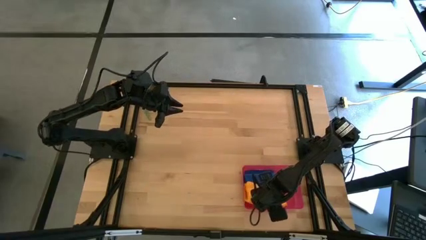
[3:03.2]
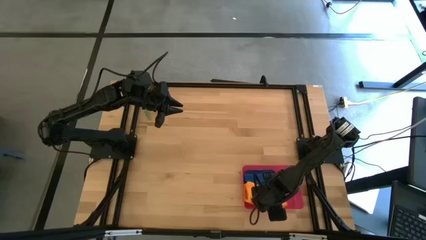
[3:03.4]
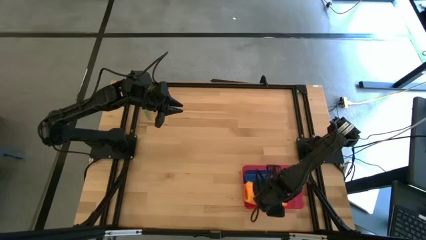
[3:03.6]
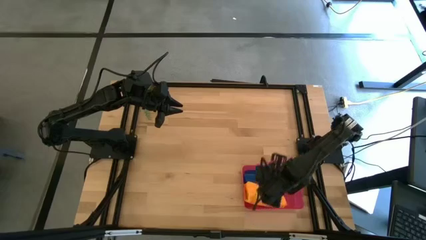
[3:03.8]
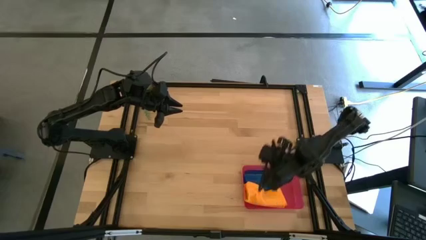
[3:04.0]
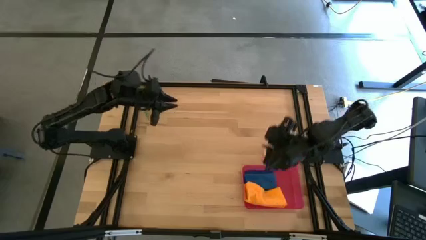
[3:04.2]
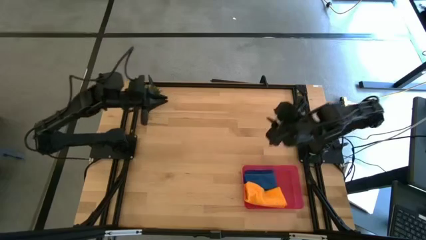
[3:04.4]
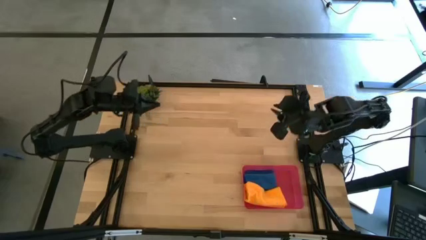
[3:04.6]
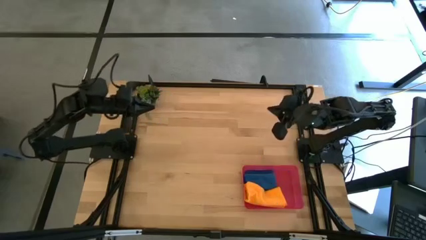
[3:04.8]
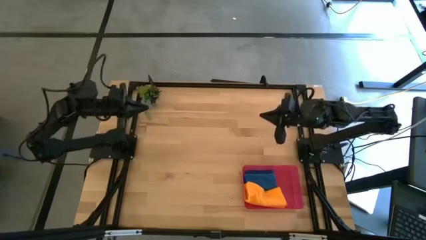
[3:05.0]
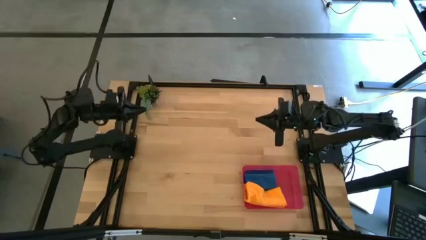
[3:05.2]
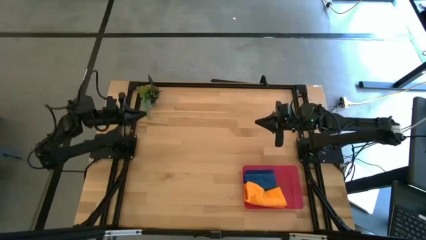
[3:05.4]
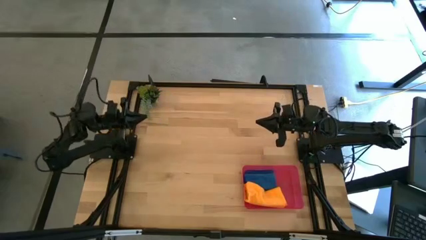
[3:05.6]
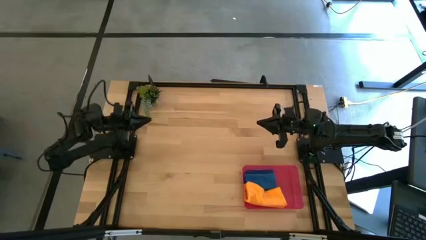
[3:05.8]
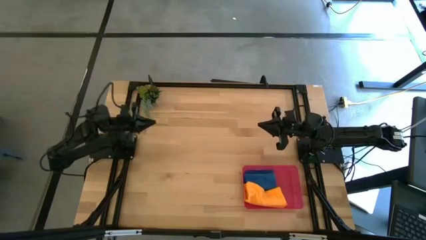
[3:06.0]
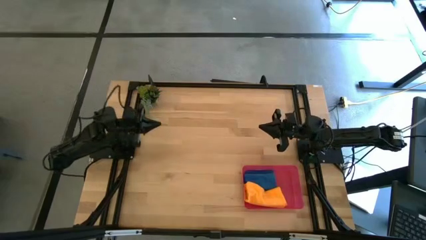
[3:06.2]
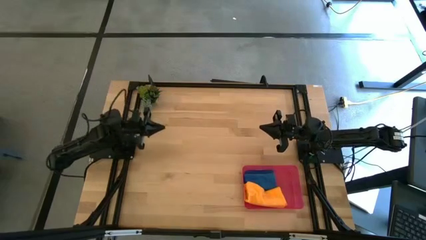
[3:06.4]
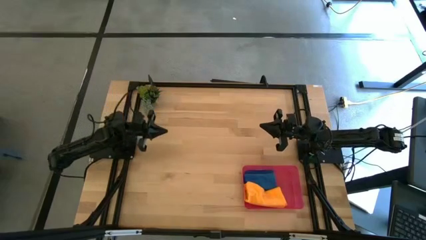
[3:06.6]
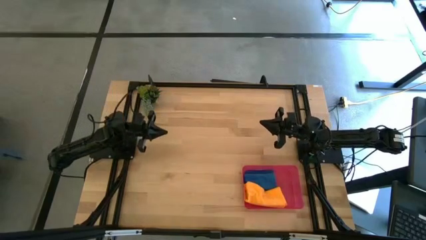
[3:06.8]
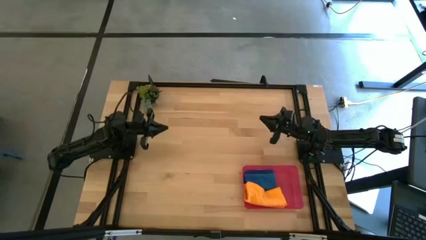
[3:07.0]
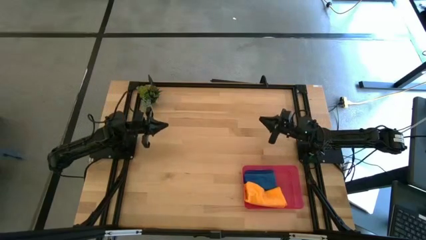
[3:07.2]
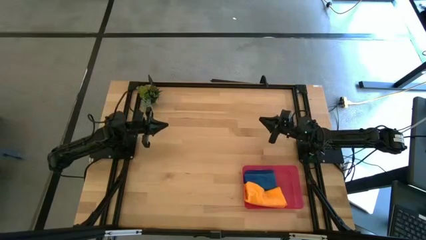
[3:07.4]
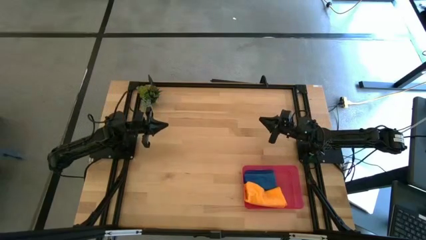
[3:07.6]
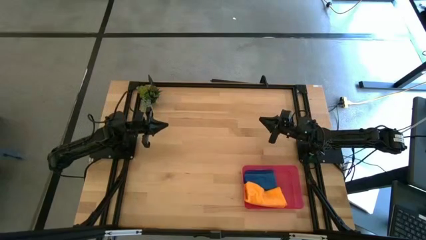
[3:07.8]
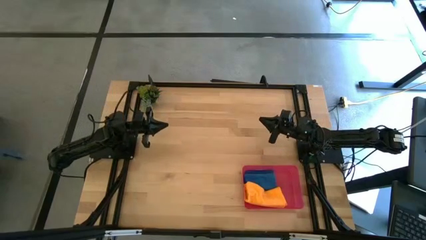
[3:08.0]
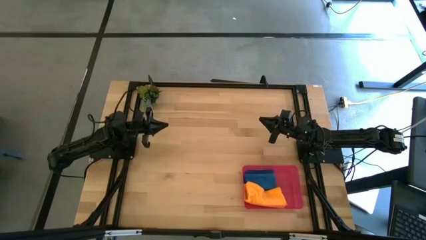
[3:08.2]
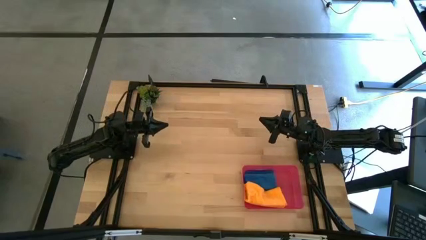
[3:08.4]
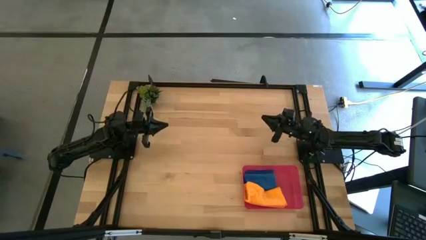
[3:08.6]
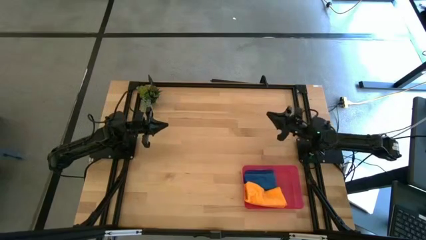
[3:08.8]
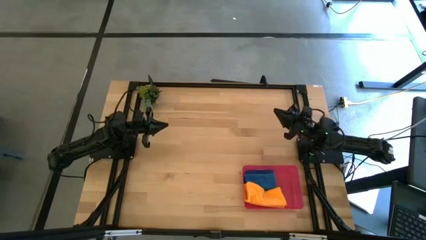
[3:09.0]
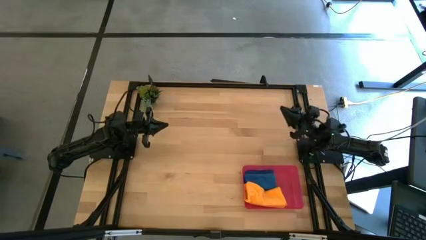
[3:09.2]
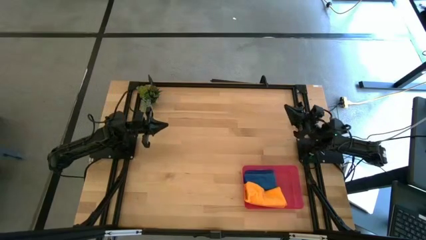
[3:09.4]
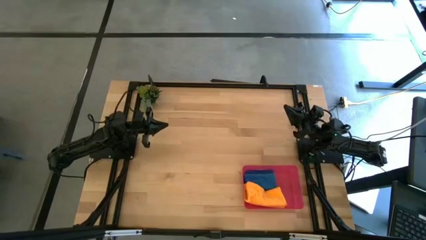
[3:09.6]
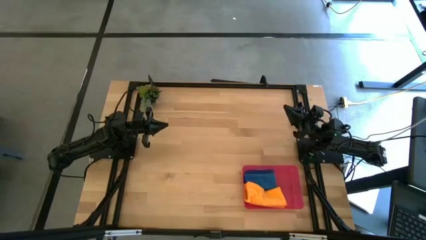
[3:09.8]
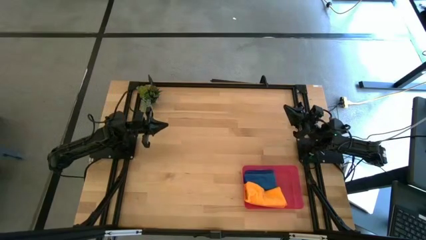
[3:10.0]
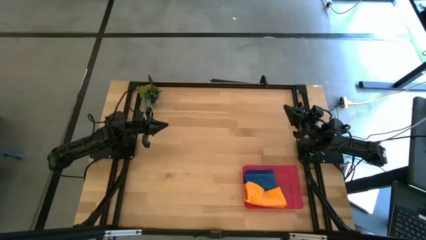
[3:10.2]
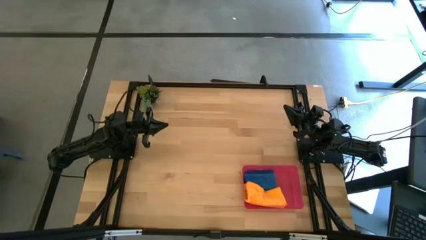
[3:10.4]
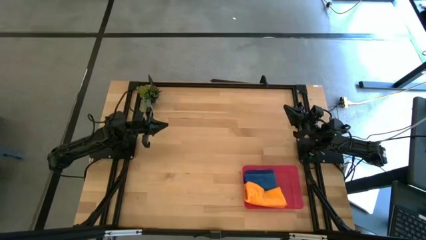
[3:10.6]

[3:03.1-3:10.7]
Task: Roll microfiber towels into tight, uniform cylinder then place into a basket
Return to Home Position

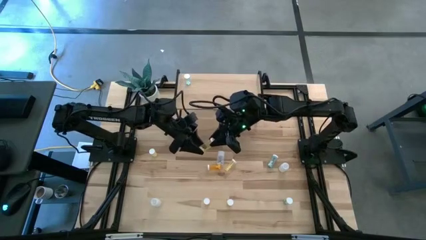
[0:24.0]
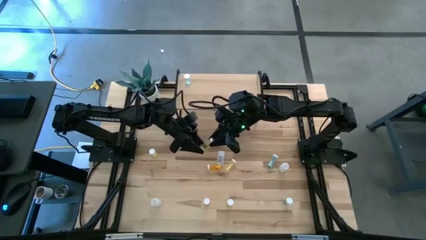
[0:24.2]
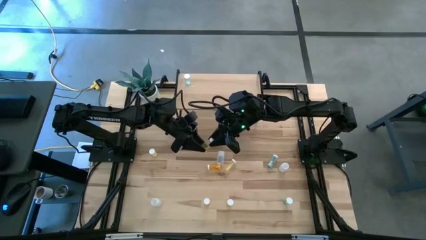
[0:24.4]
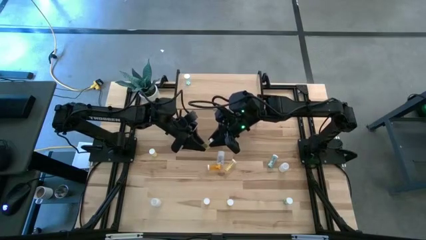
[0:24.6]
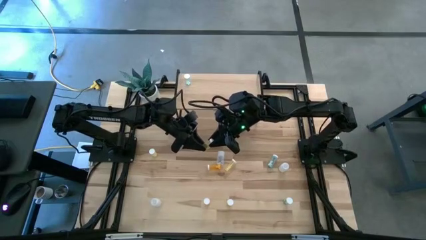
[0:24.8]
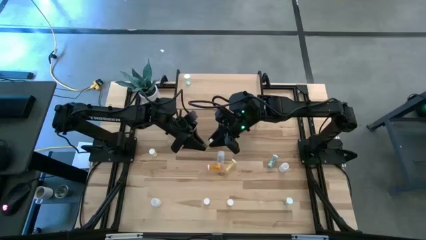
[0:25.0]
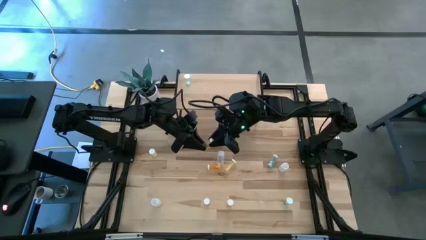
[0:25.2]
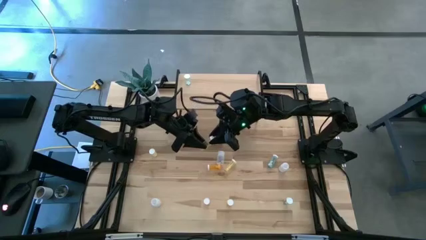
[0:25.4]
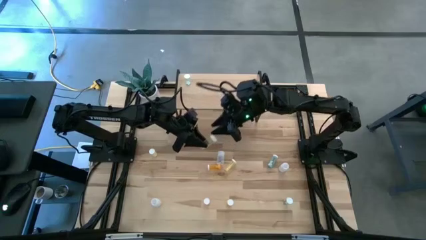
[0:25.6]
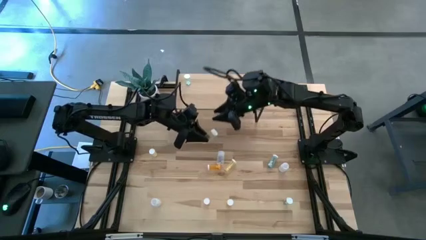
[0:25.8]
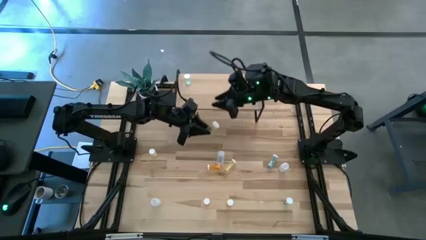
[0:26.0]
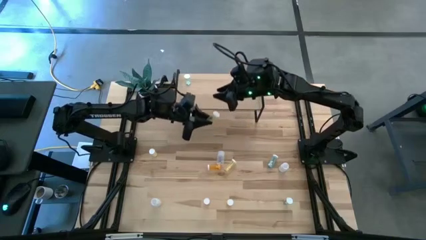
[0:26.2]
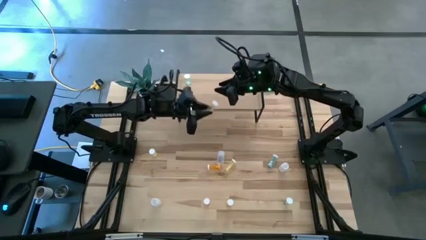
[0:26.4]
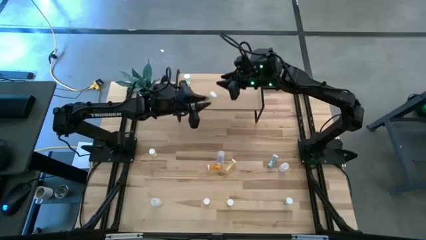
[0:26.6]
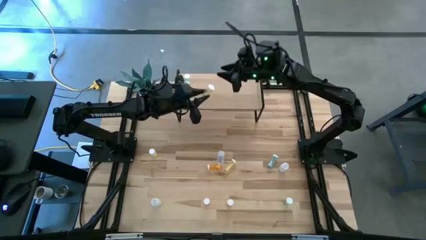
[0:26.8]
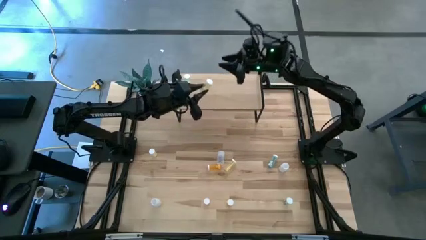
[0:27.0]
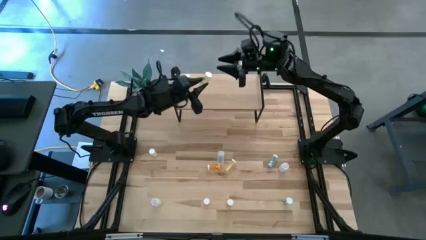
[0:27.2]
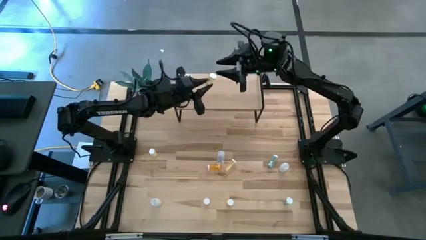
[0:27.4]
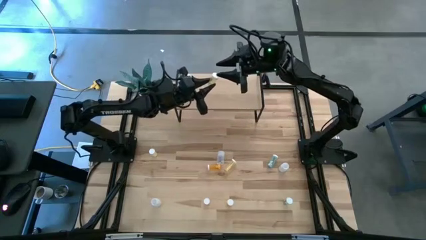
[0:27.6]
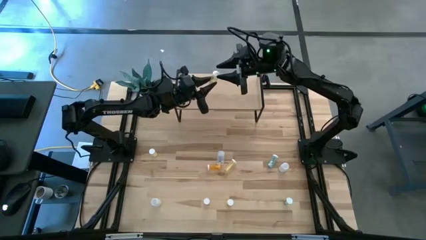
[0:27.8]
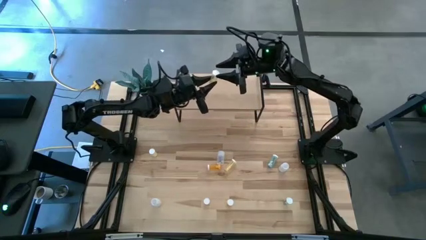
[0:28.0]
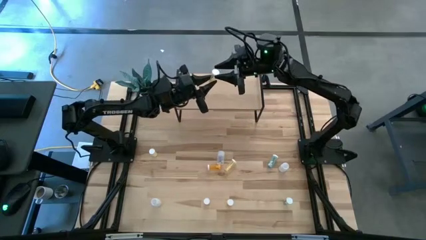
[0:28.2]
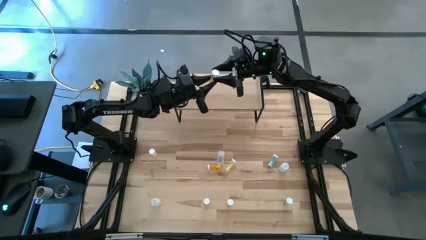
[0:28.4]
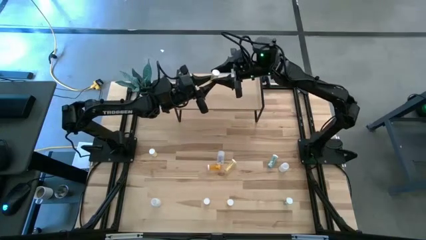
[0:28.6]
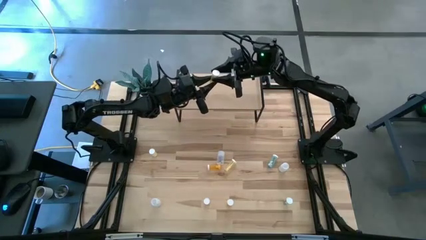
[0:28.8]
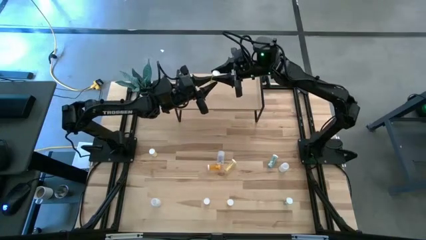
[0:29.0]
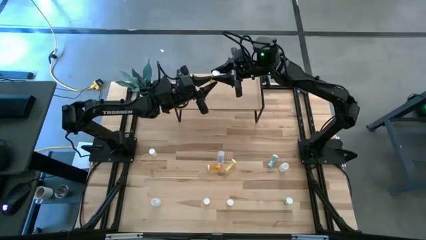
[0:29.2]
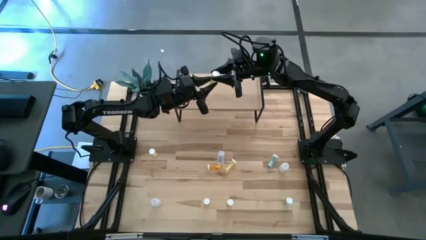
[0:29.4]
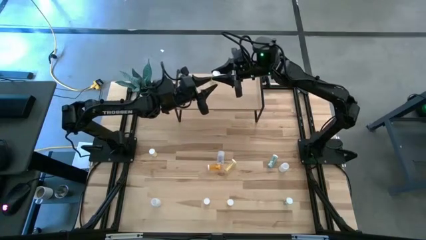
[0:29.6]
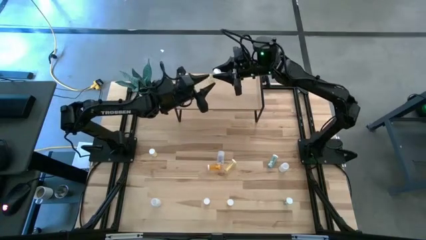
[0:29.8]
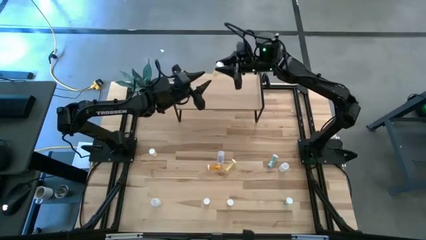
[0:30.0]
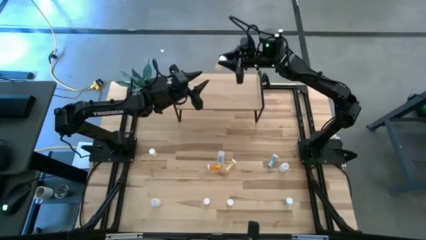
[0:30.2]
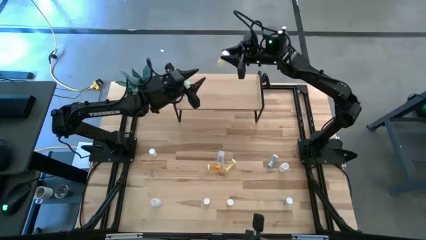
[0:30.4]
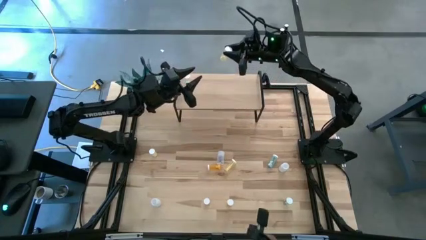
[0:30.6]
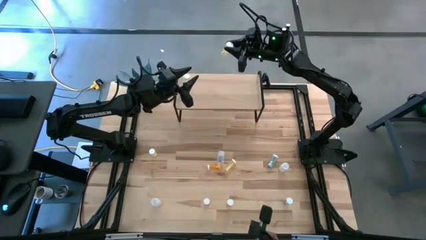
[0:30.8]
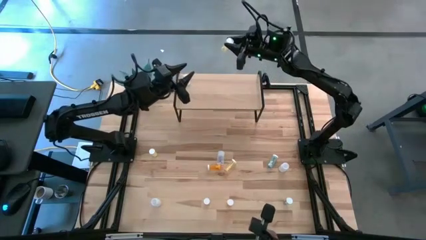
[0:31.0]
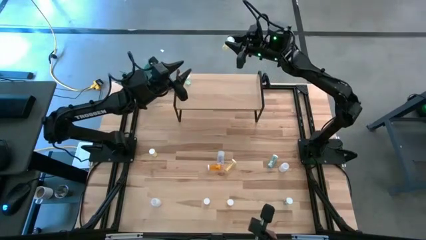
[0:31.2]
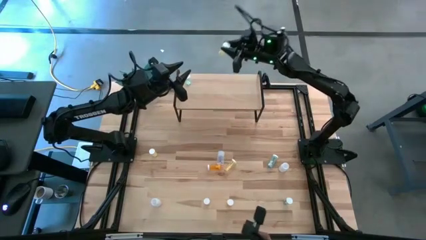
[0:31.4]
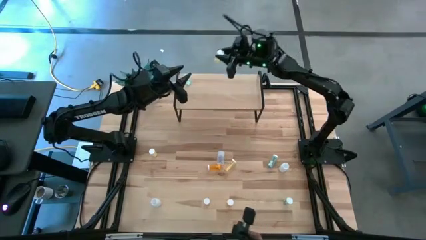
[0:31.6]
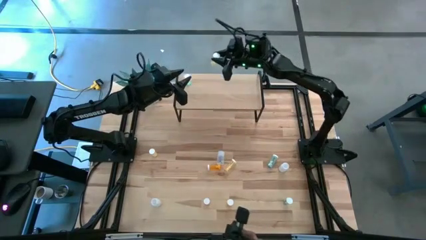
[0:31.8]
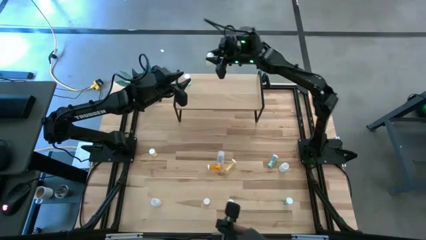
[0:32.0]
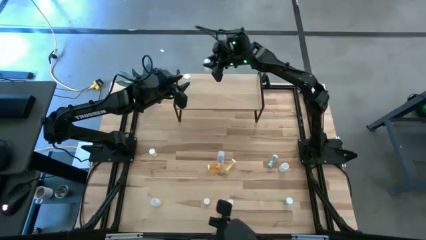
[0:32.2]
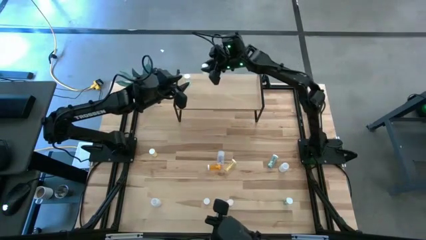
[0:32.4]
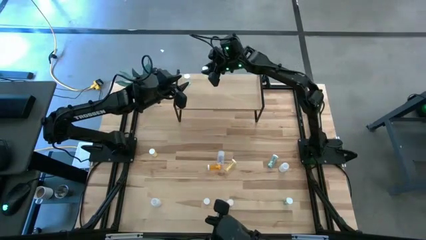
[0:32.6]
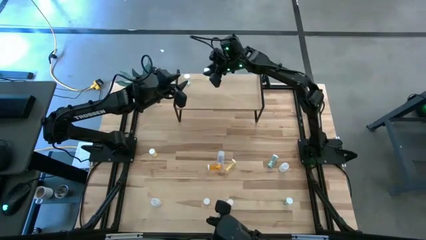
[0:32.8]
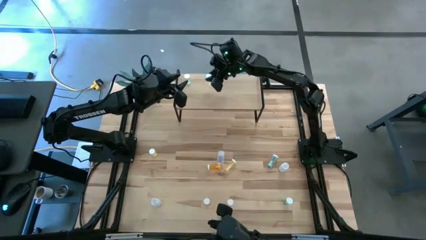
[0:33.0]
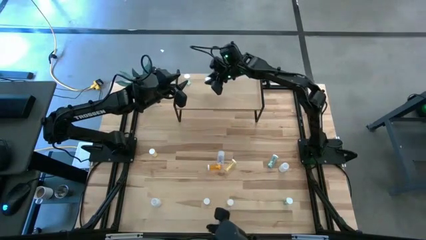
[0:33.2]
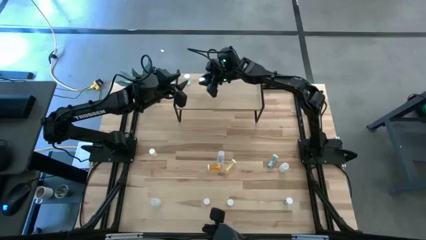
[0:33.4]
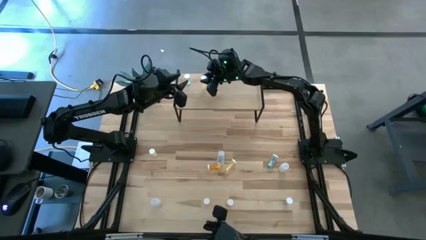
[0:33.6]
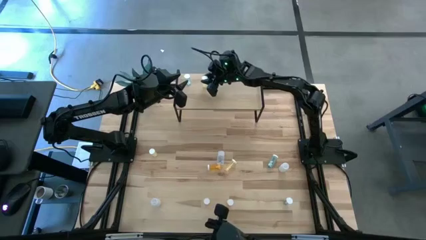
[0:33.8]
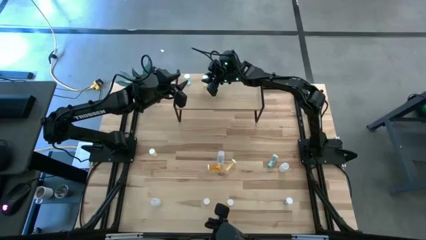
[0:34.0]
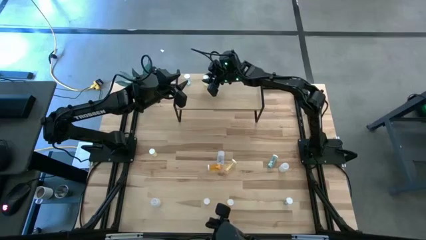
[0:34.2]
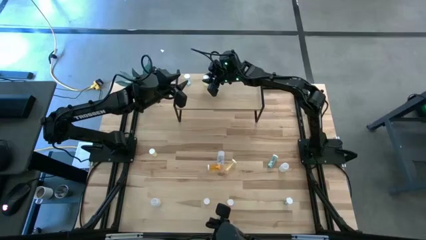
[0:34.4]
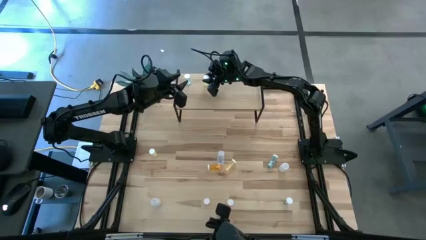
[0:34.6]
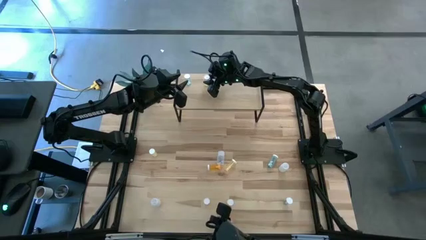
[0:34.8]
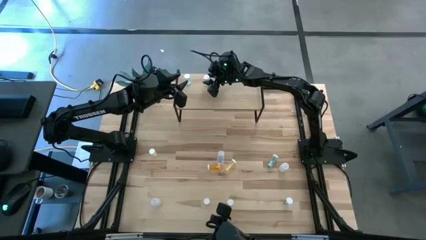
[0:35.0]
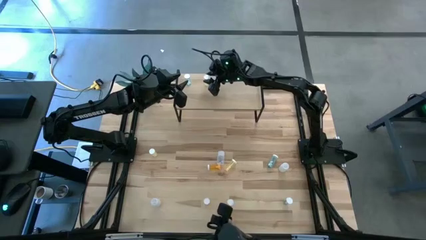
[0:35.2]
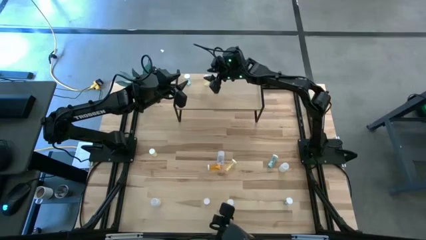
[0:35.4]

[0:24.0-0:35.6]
Task: Pick and place medicine bottles onto shelf by color
Put the top right yellow pill bottle on the shelf
